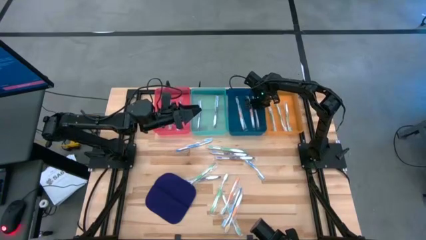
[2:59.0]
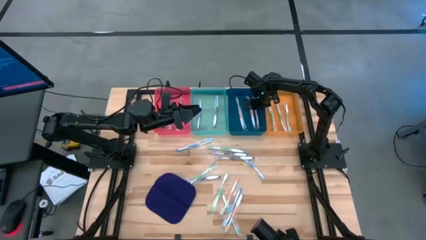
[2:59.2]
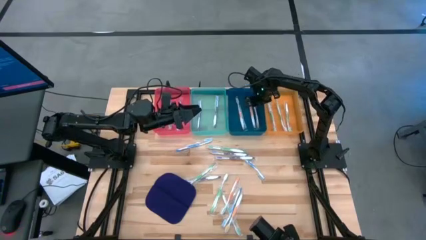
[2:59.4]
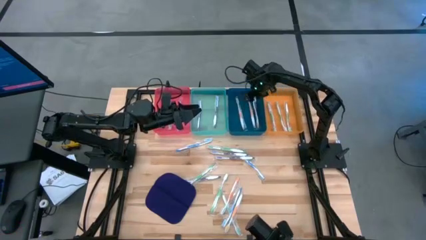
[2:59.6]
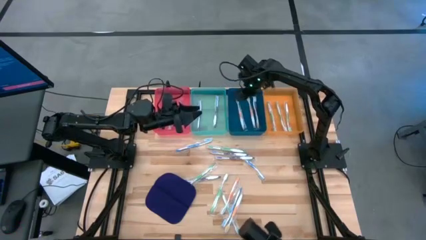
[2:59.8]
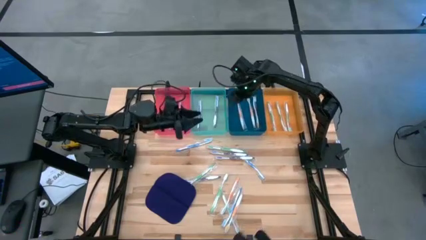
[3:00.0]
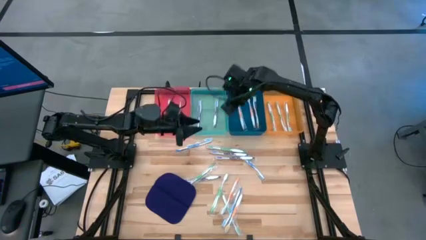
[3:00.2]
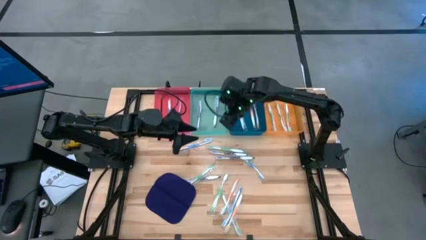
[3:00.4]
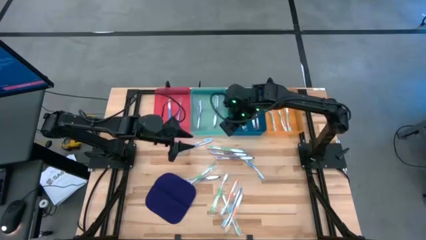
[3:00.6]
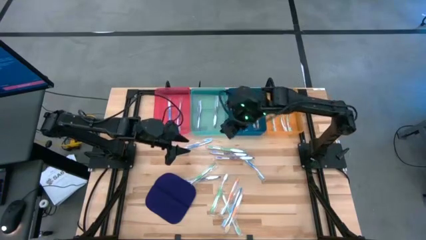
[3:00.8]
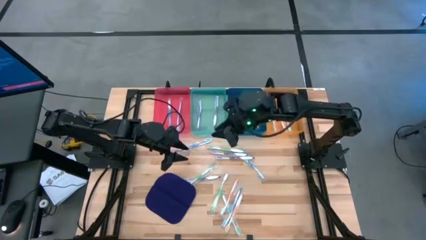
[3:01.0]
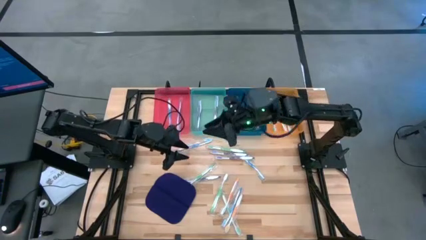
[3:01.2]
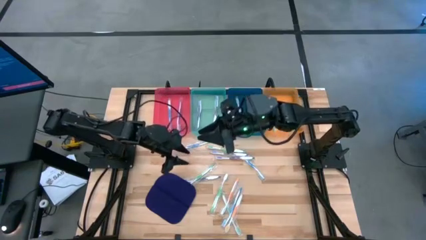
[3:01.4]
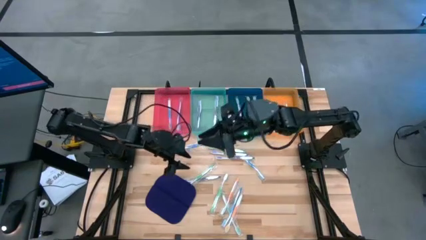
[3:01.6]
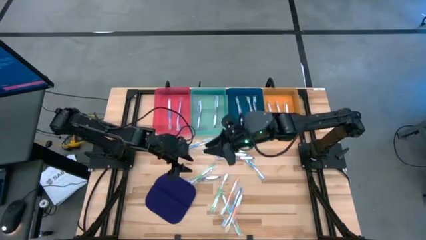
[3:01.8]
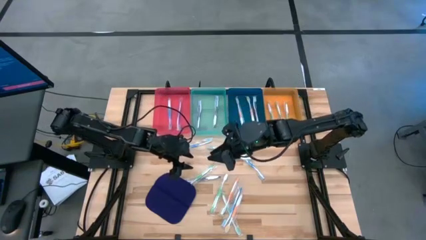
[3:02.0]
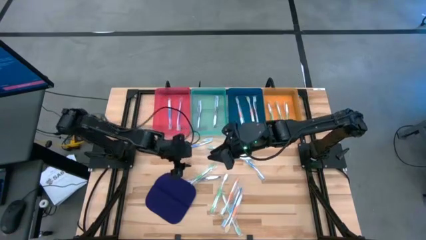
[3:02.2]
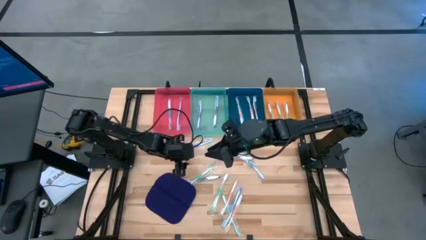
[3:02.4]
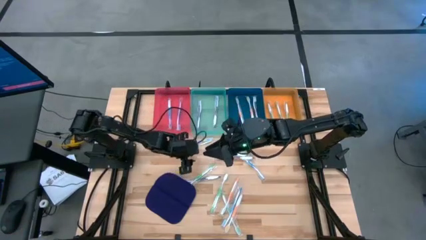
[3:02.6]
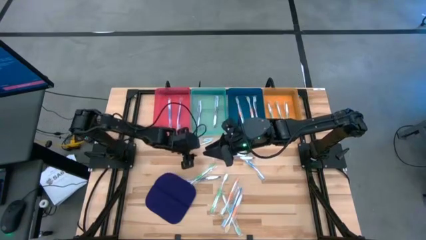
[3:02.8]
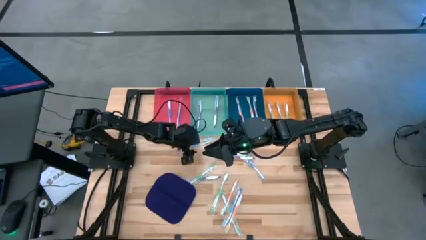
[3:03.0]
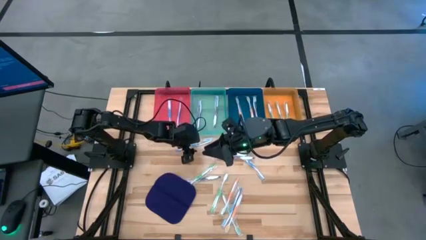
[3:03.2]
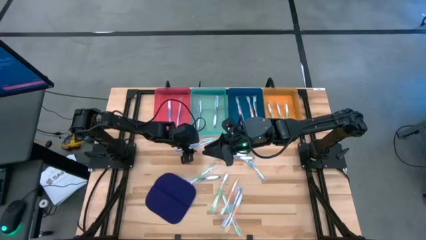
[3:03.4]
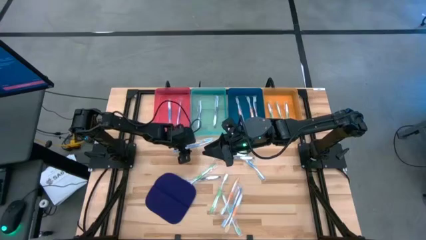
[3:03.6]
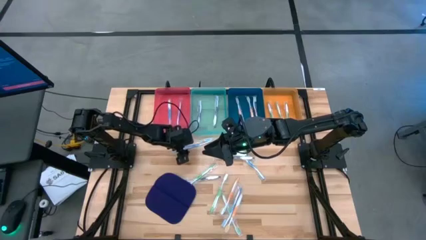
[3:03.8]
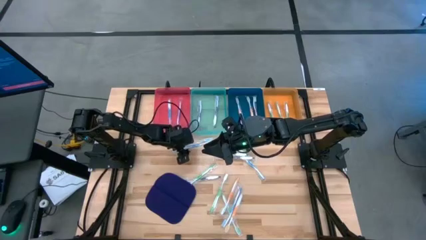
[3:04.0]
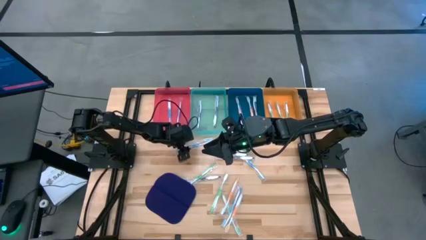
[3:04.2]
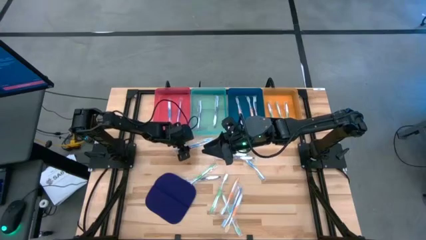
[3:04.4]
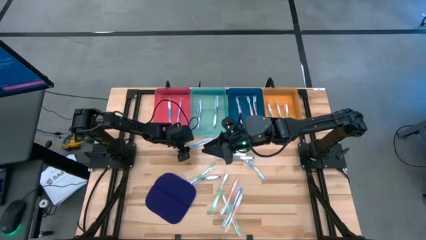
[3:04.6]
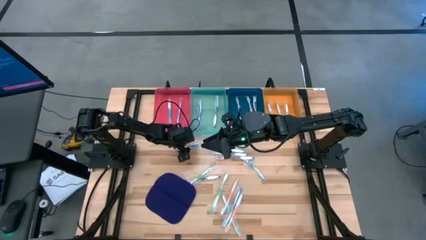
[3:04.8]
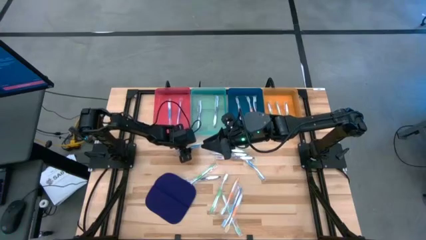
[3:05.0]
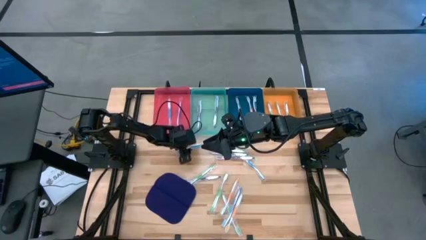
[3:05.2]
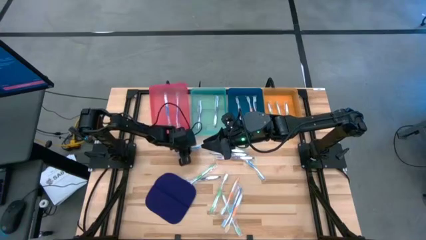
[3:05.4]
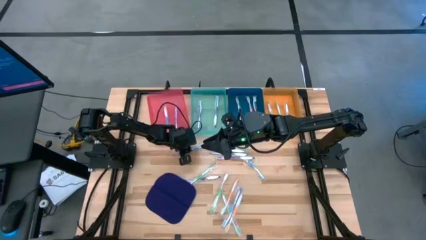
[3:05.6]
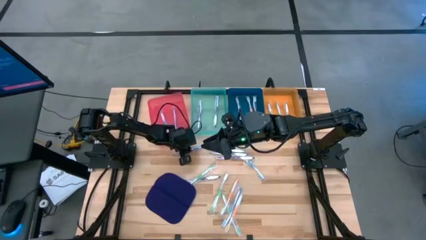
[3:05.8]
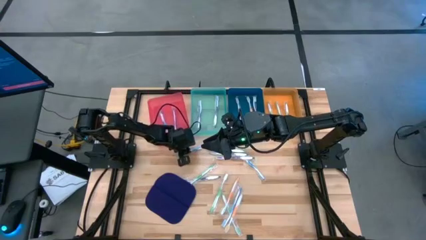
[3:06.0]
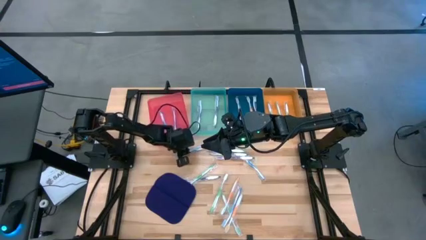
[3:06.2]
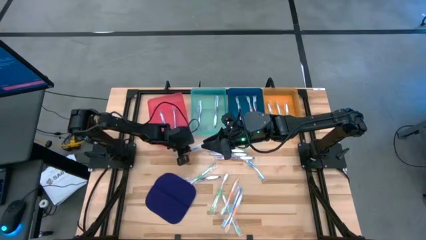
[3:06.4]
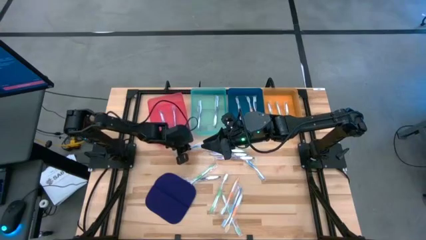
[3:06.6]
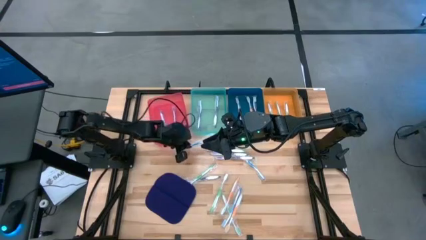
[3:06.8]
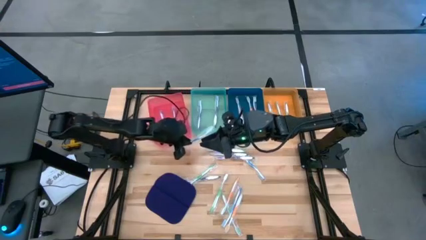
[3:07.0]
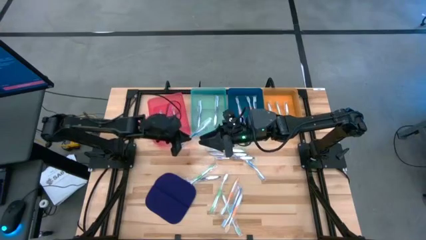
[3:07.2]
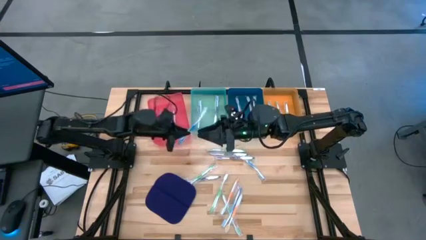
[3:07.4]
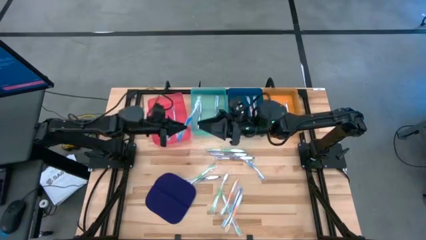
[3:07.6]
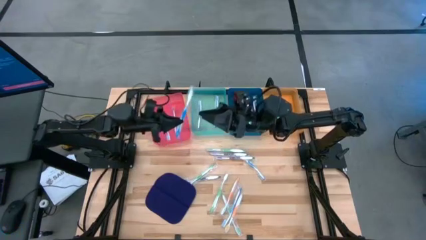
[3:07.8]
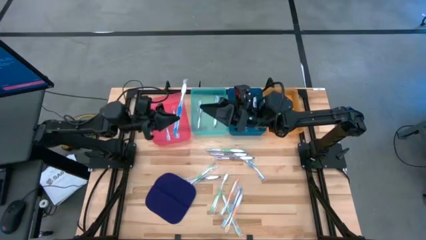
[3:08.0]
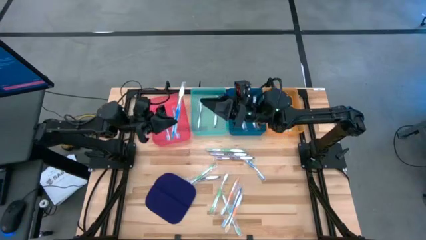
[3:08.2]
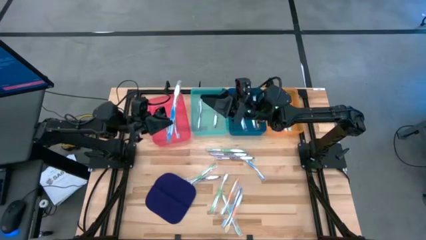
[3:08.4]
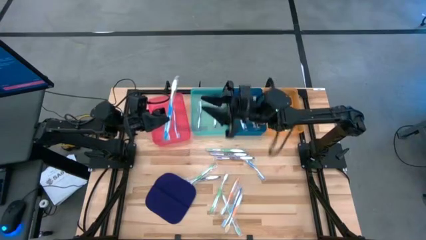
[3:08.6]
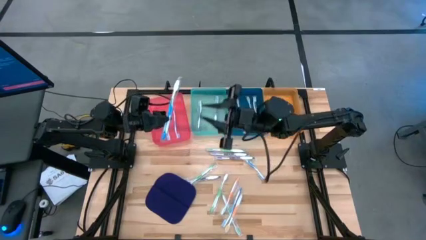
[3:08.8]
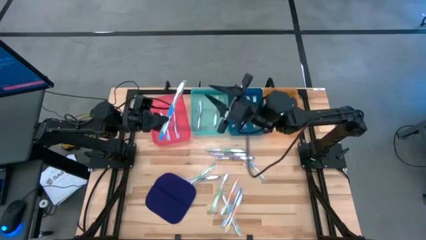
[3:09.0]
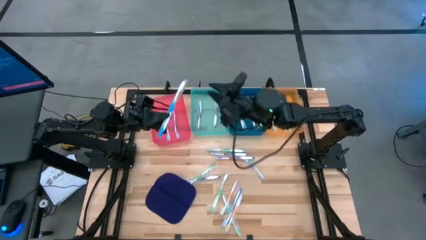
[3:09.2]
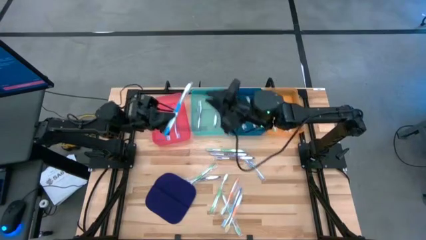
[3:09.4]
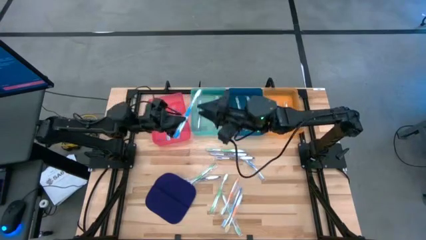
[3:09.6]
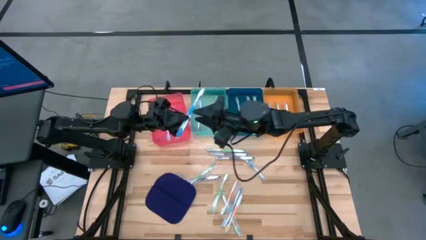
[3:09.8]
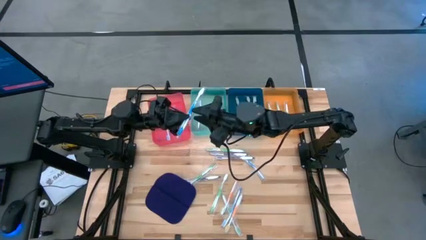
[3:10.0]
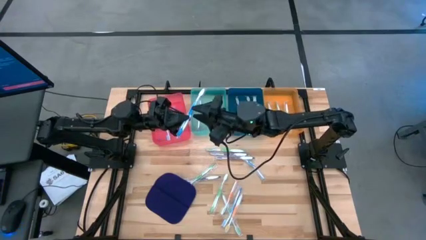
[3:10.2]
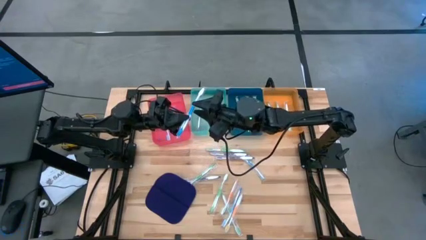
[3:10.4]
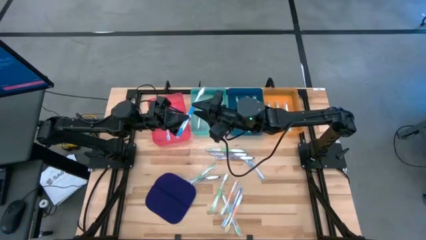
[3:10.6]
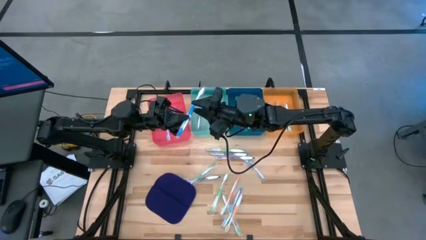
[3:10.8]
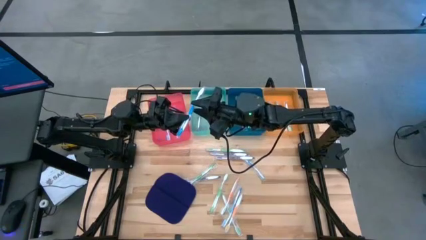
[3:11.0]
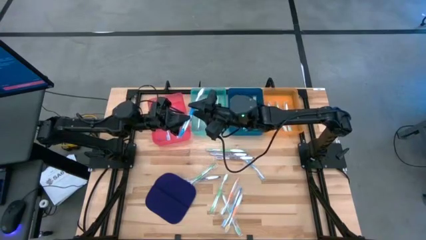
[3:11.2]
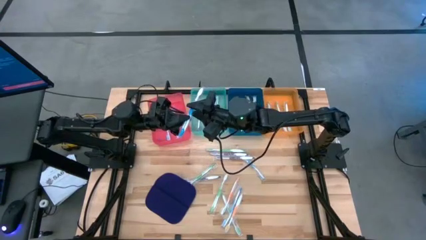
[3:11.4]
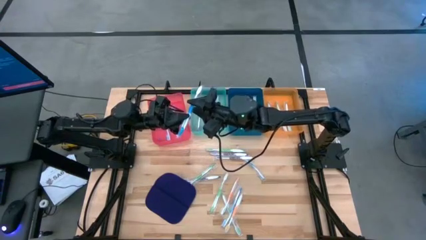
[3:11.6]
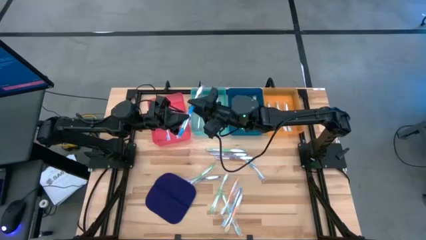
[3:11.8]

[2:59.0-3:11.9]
Task: Pick & Place Toothbrushes
Put the blue toothbrush into the red bin

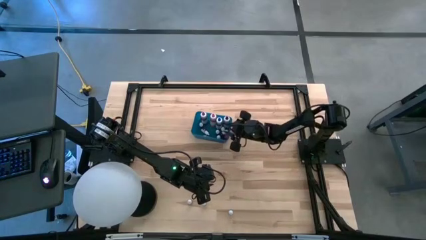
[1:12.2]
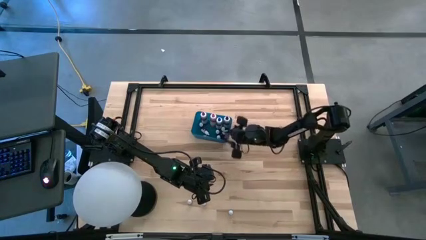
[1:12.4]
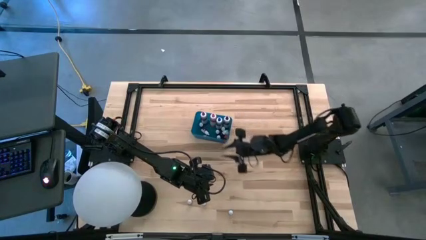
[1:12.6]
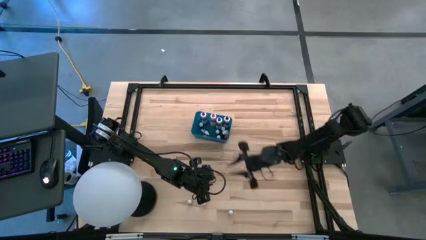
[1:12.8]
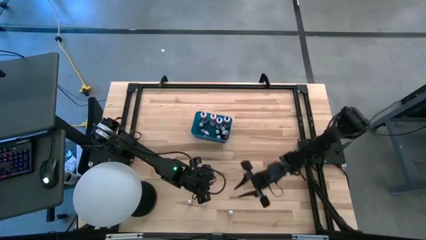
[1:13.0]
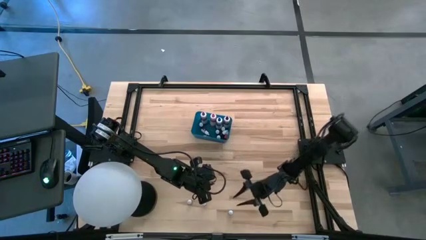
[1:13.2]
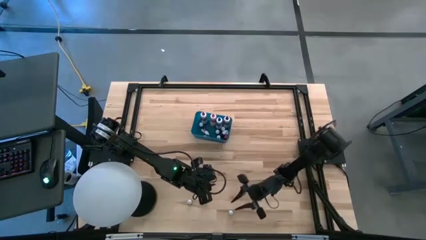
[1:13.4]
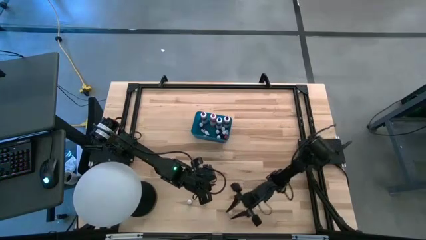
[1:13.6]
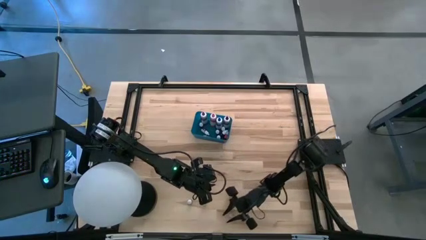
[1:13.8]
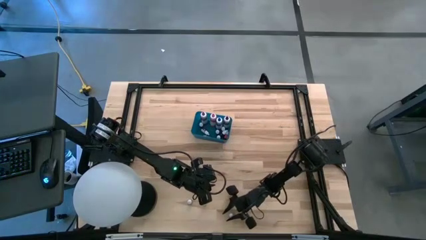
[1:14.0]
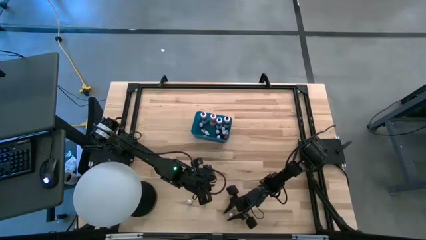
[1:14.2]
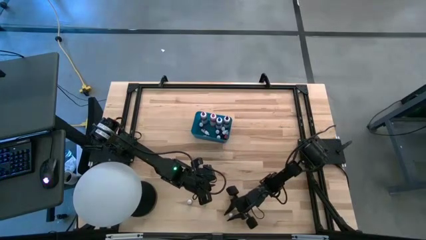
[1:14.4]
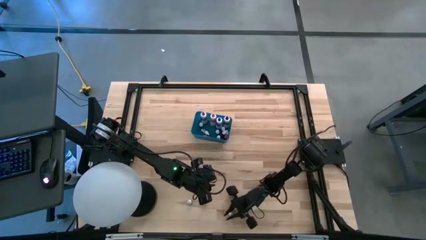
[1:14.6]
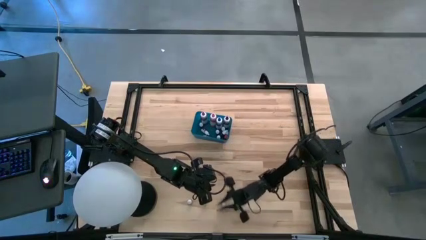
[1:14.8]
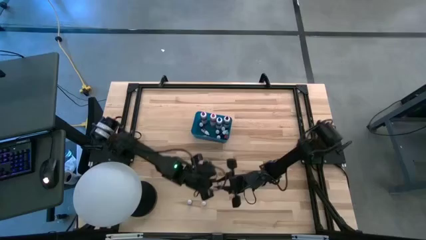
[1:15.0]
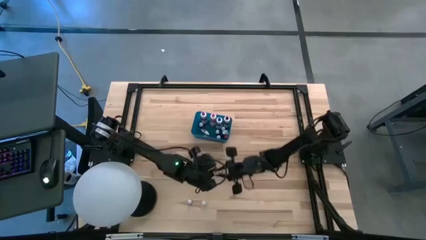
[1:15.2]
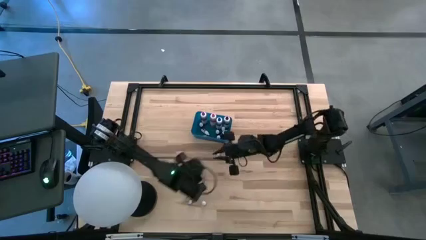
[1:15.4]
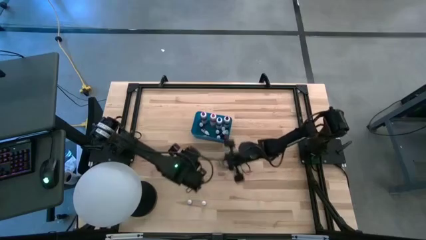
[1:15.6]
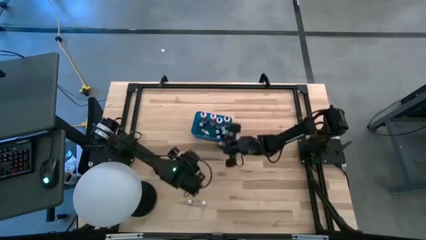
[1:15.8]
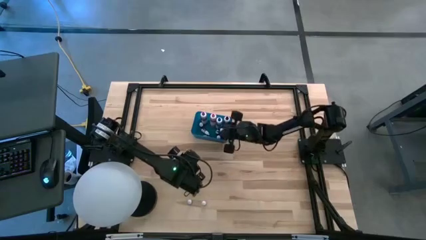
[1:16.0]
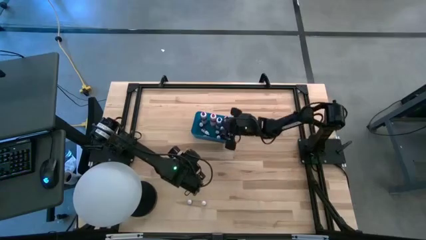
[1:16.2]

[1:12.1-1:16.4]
Task: Pick & Place food coloring
Put the blue food coloring bottle into the blue bin
